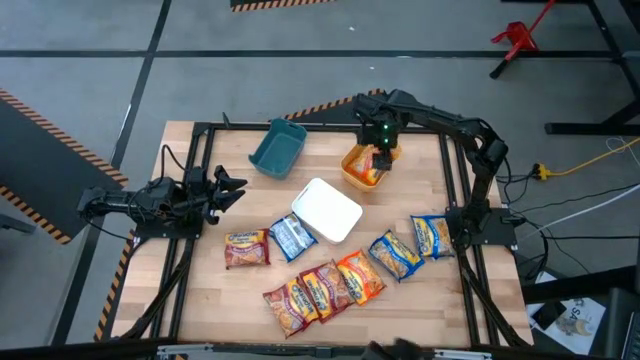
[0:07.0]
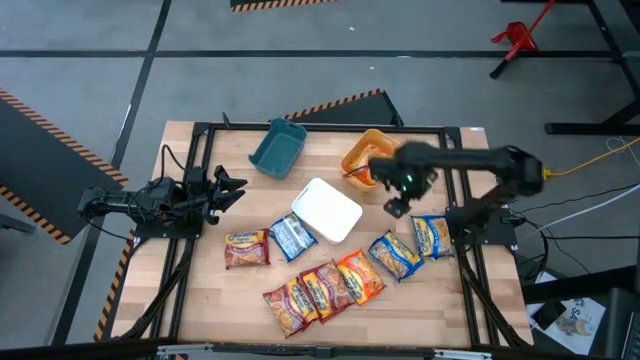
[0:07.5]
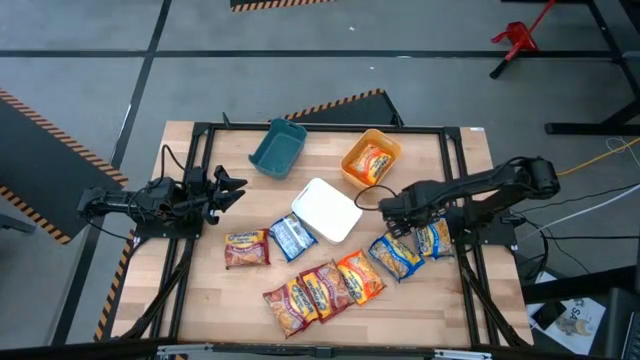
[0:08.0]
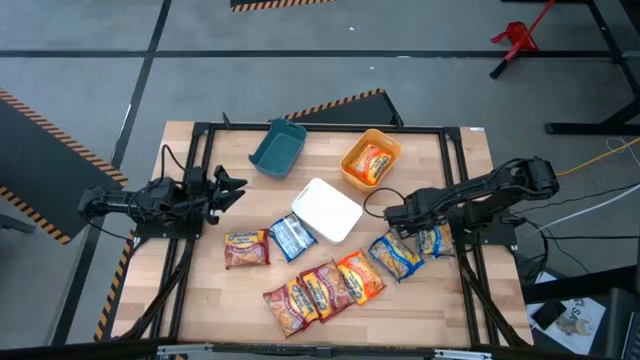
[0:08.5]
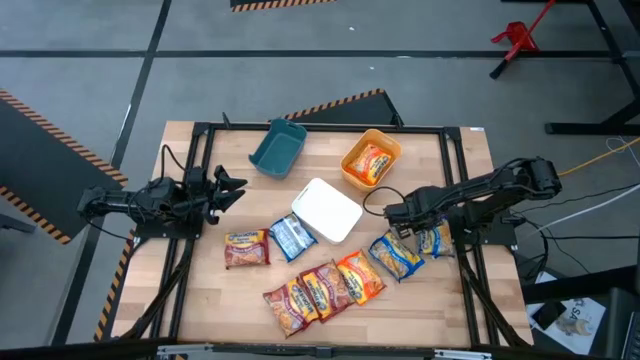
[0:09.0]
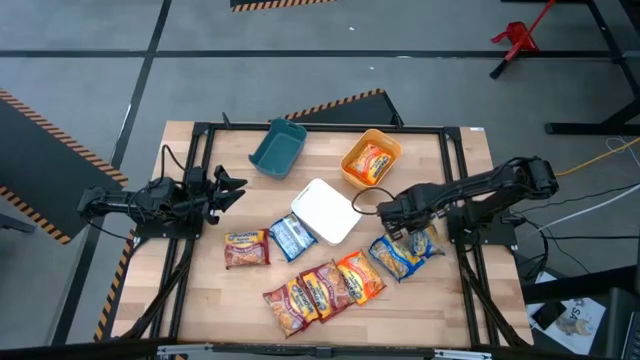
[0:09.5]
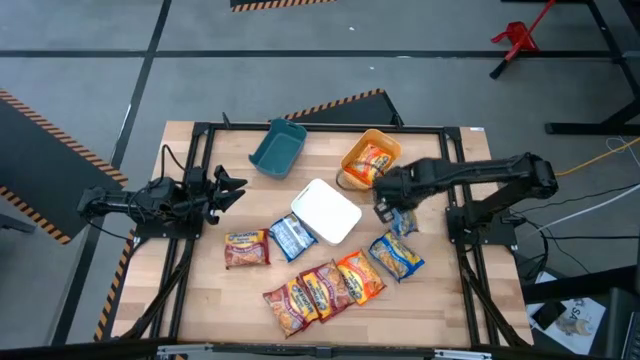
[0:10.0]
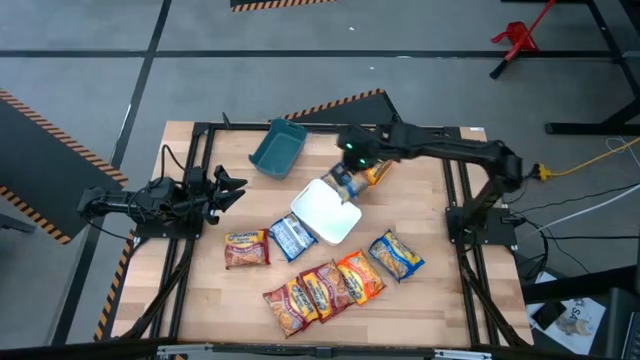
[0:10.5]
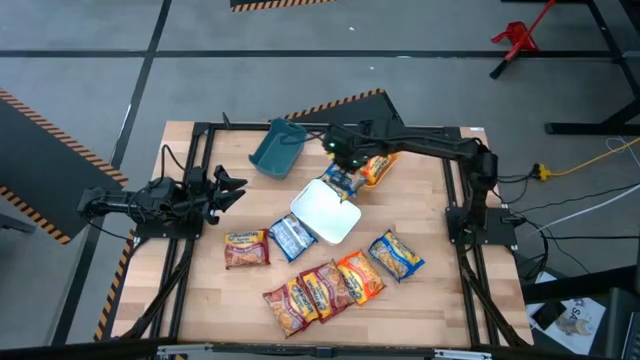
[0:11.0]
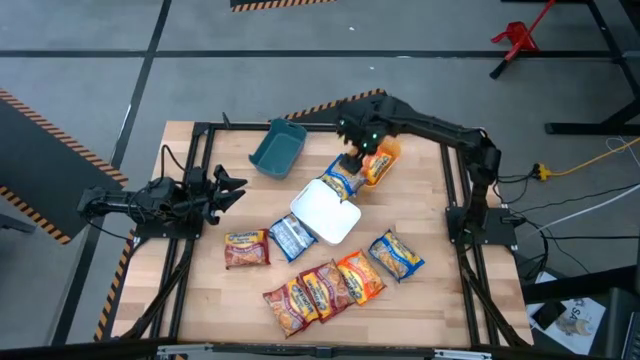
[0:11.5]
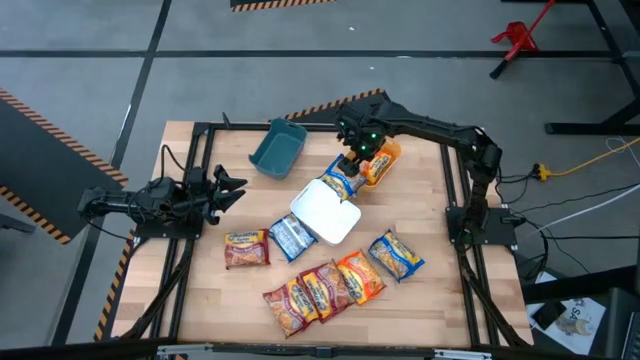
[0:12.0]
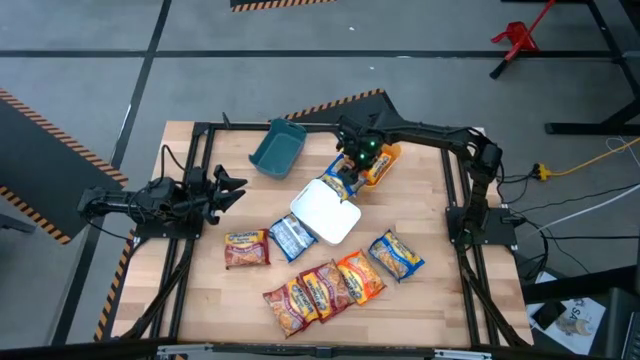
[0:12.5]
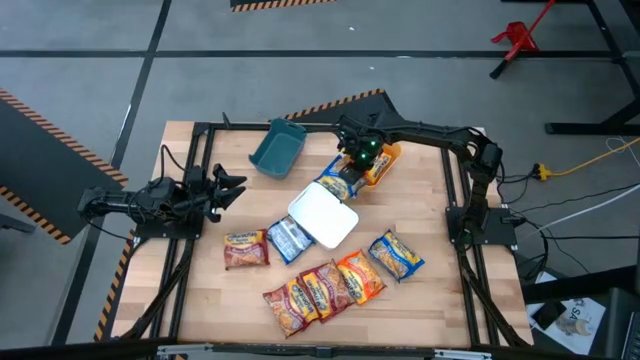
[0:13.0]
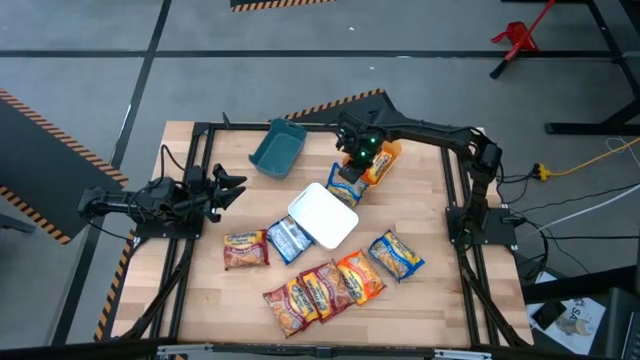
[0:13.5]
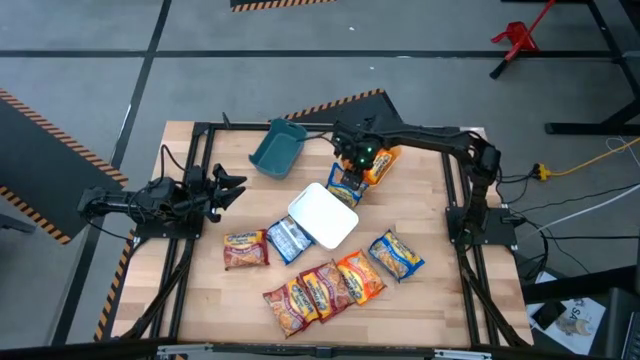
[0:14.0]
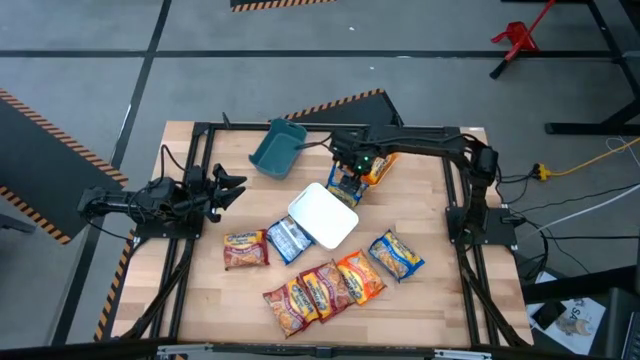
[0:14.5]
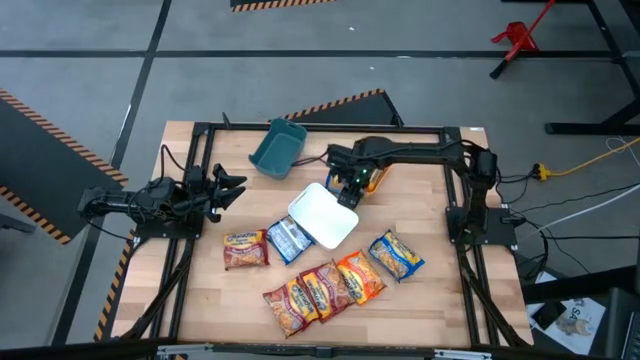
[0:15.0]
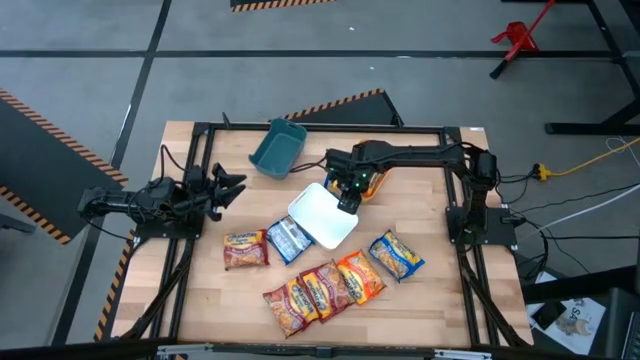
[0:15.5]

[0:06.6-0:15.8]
Task: Sort Maruchan noodles
Put the right blue noodle pack into the blue bin

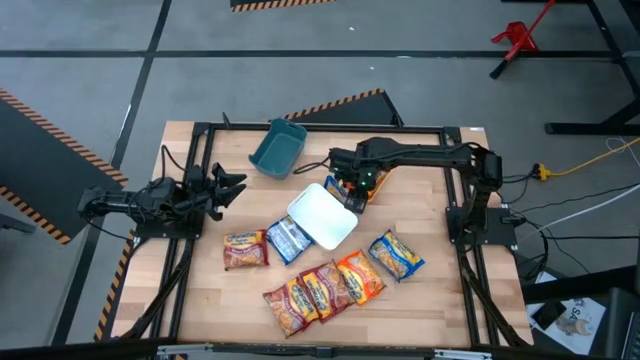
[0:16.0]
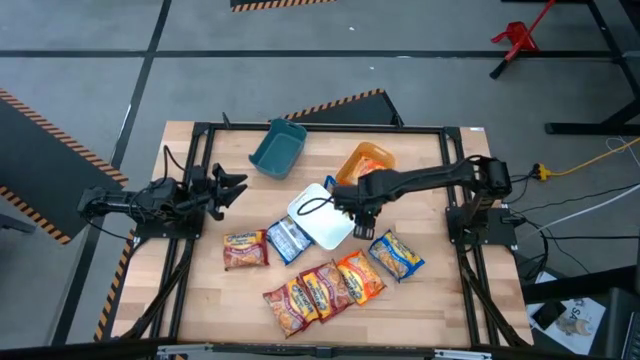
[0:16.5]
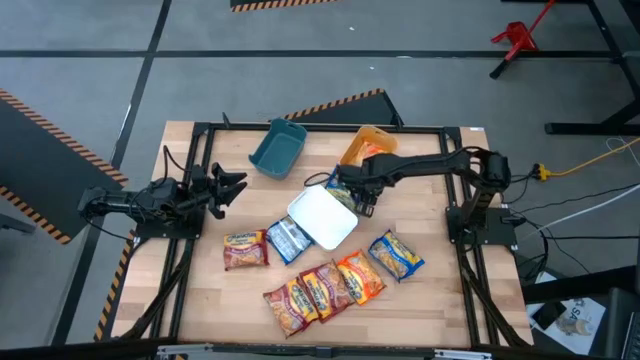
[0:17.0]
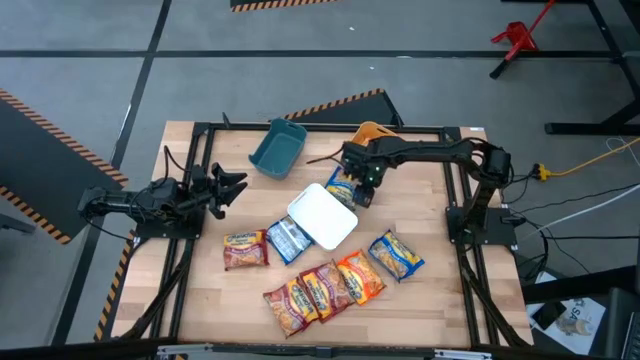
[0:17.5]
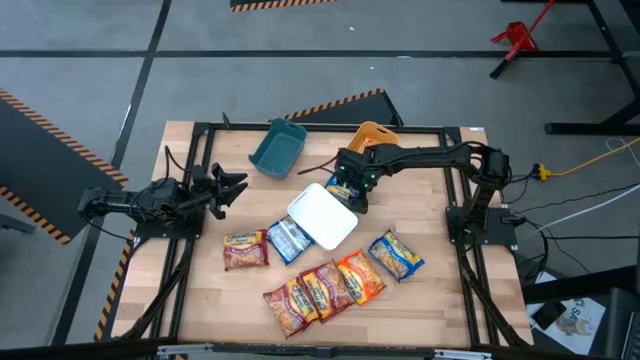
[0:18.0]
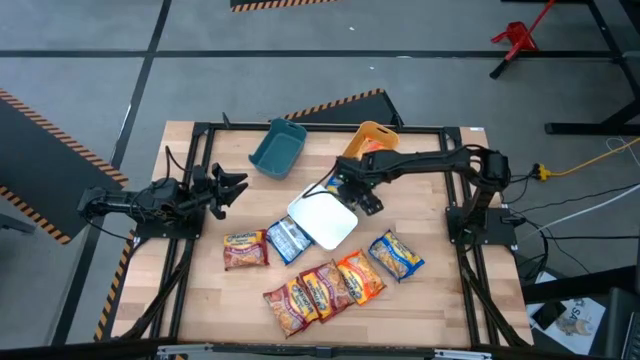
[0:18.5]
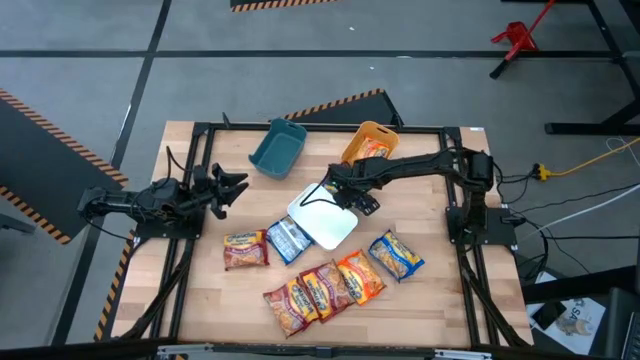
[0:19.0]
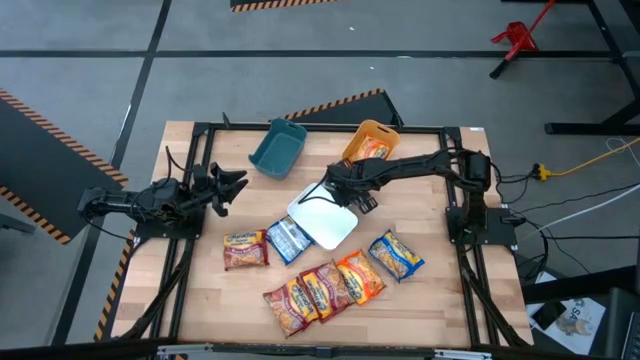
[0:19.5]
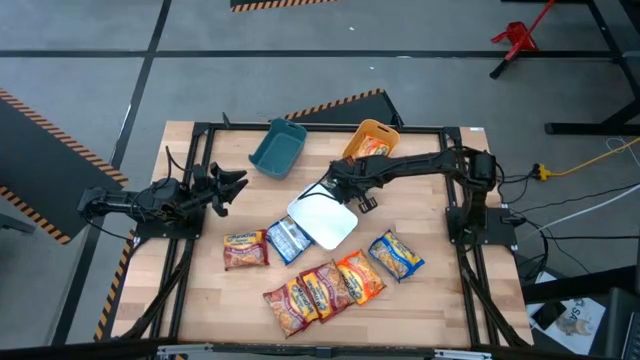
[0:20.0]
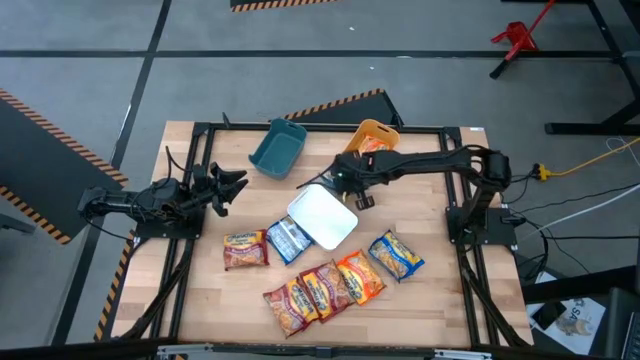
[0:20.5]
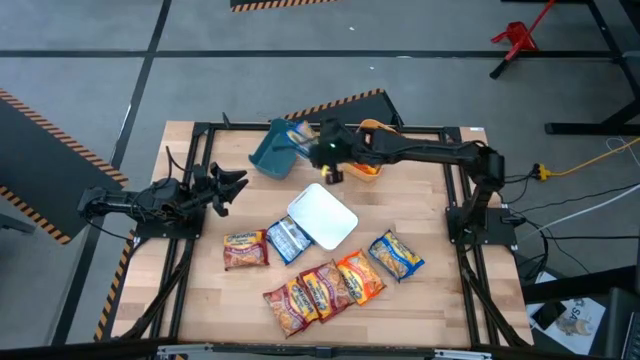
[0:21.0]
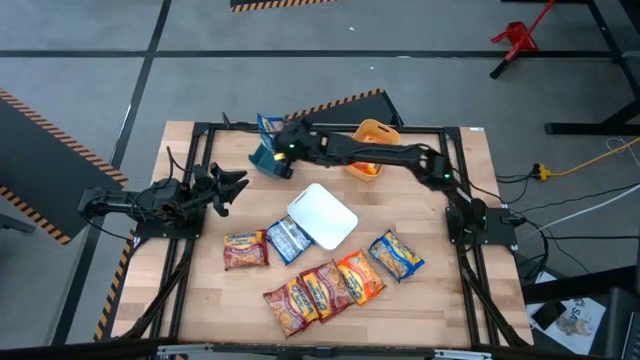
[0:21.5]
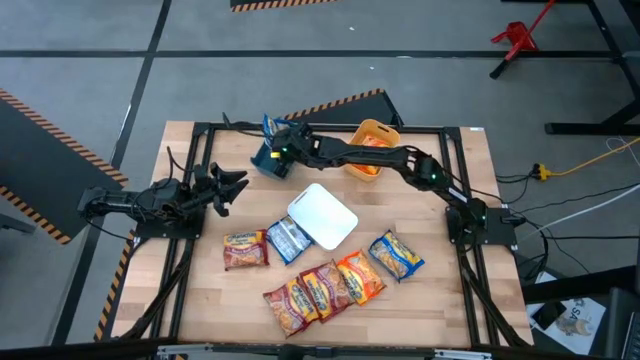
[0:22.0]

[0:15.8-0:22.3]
Put the right blue noodle pack into the blue bin

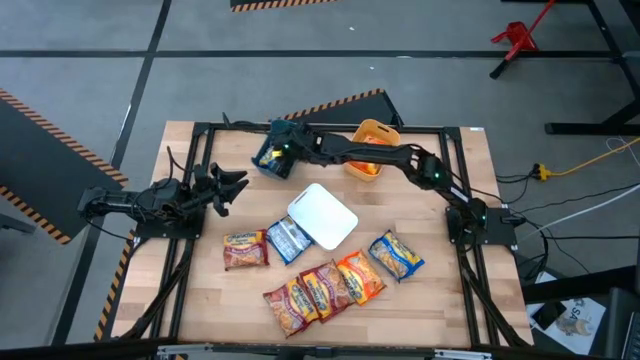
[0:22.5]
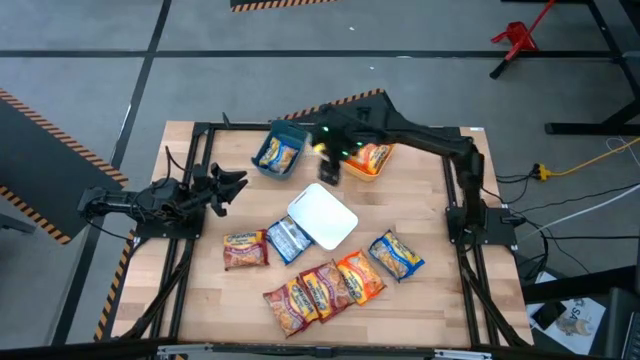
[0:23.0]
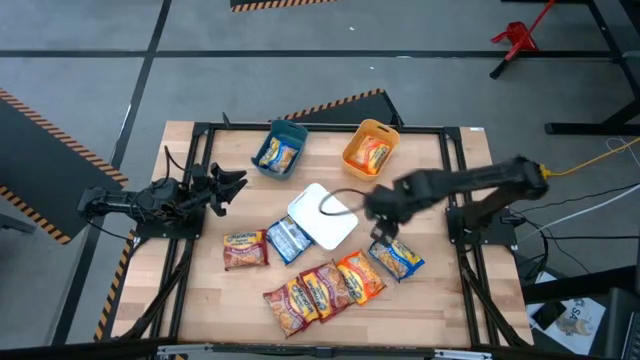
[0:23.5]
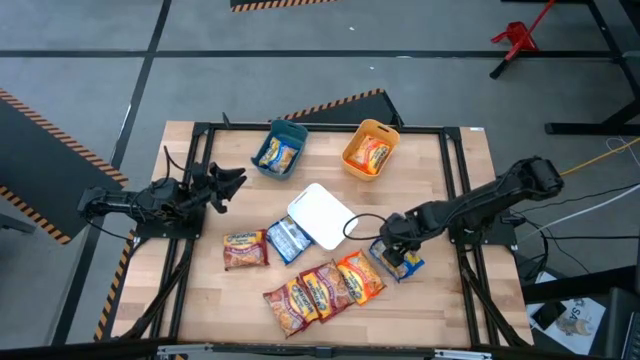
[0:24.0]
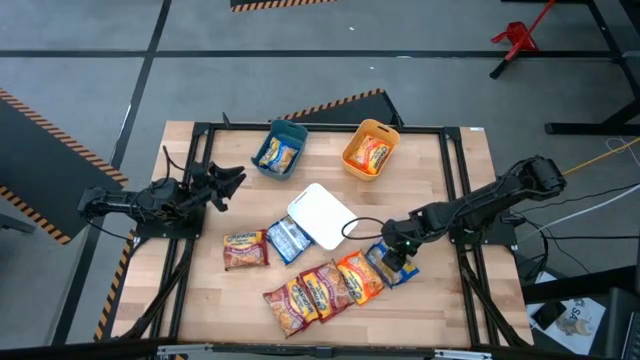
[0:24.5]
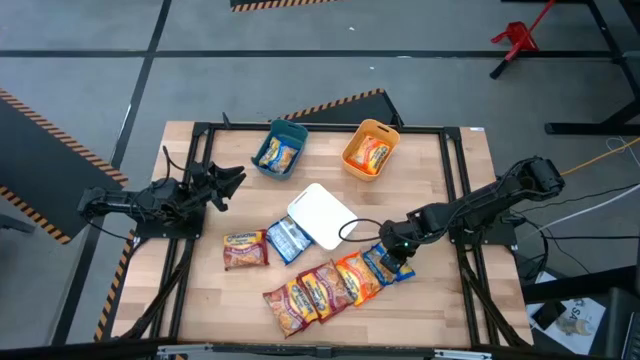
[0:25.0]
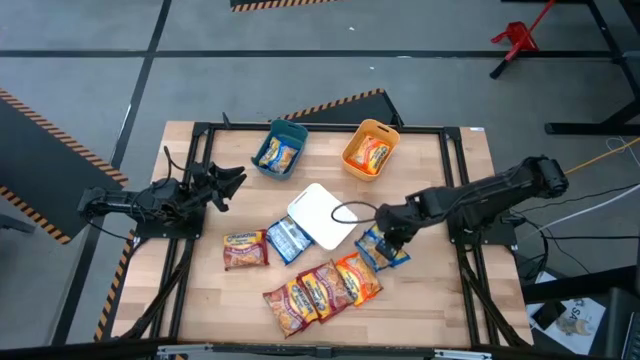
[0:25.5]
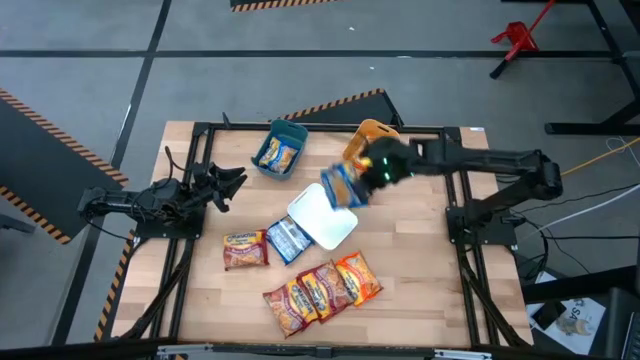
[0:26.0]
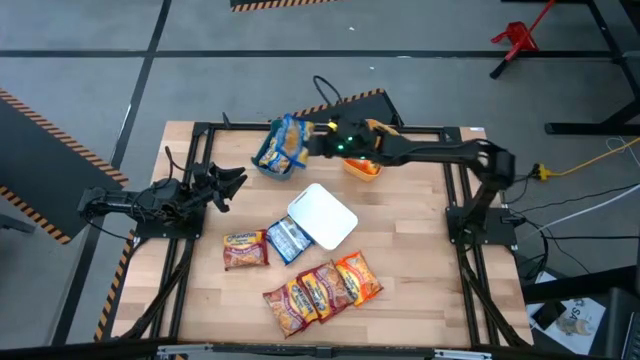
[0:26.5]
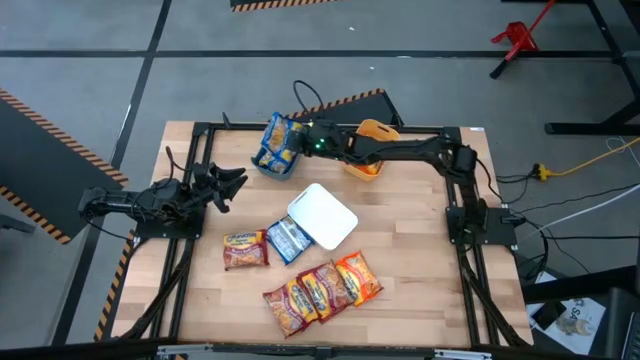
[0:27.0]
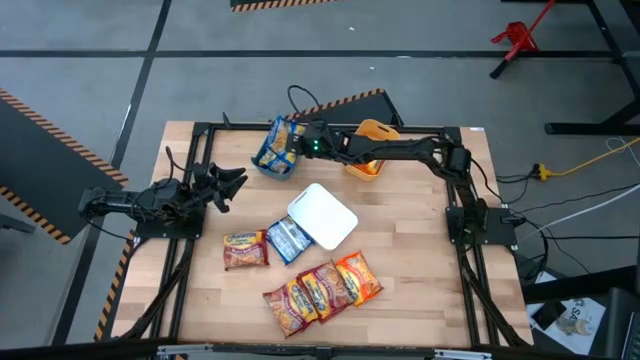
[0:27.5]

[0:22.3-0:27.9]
Put the right blue noodle pack into the blue bin

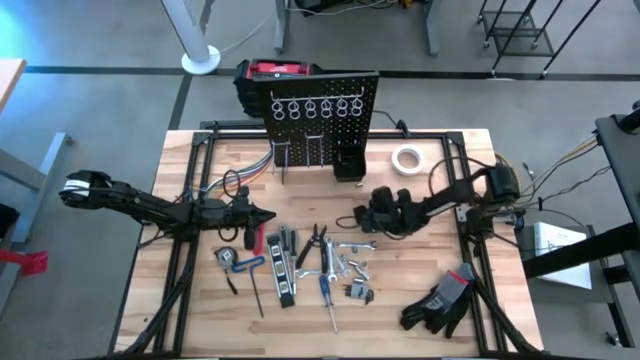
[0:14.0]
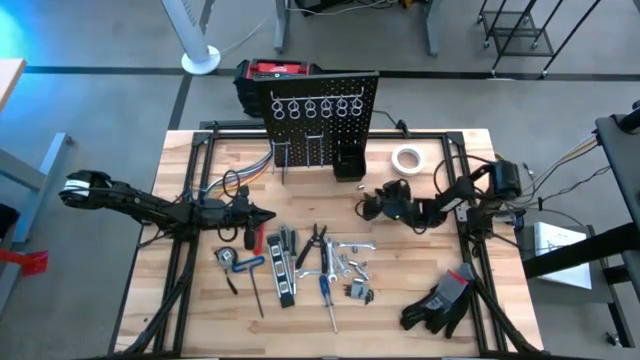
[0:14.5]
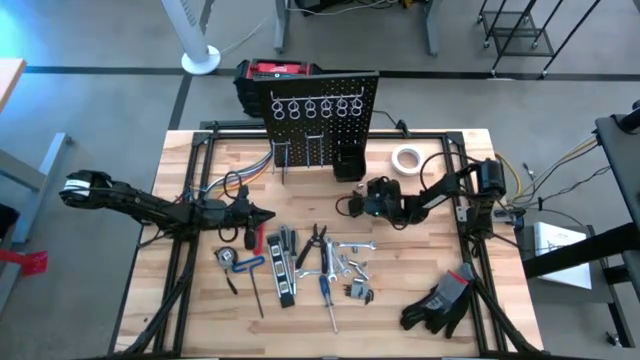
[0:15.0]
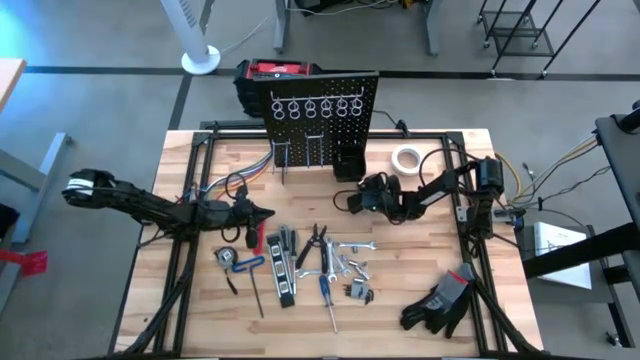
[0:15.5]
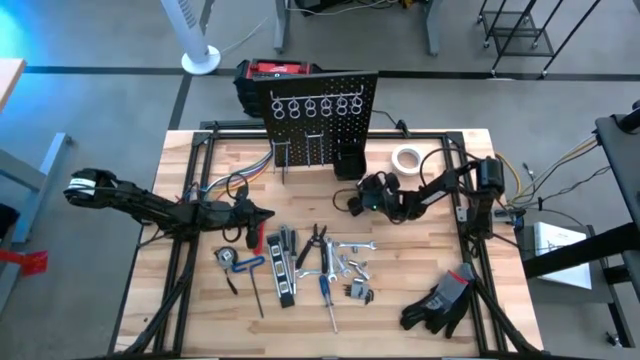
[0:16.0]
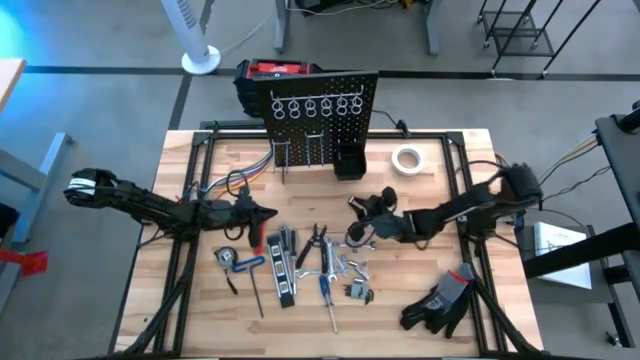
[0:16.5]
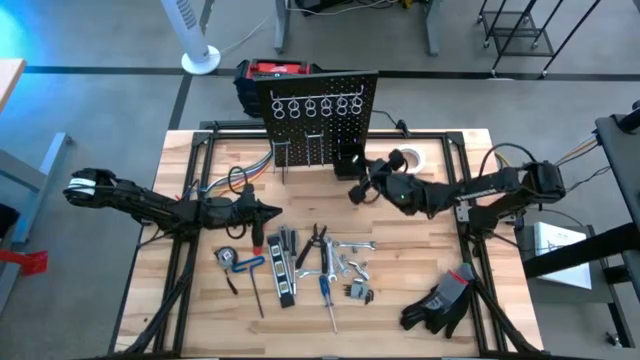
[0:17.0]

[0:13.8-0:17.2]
Task: Hang tools onto peg board
Put the socket into the black tool bin on the peg board
